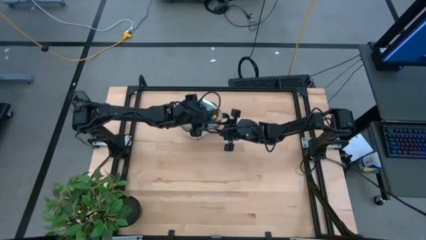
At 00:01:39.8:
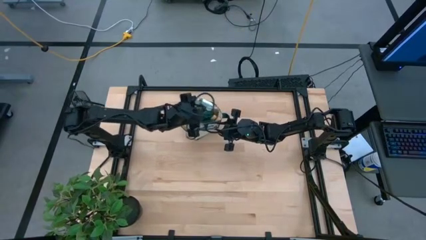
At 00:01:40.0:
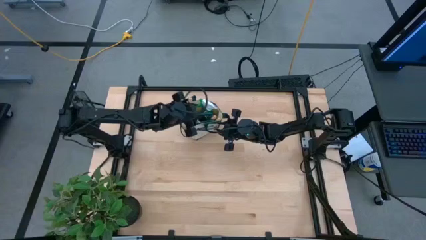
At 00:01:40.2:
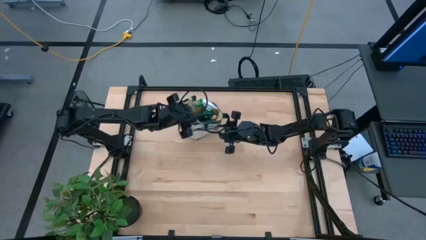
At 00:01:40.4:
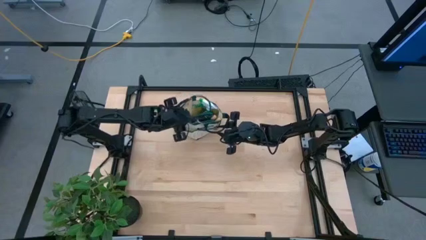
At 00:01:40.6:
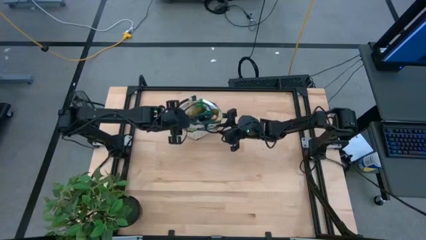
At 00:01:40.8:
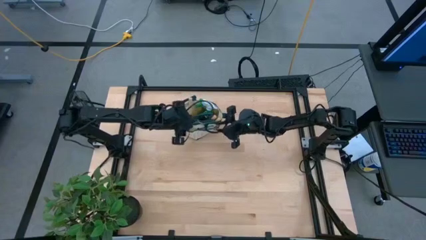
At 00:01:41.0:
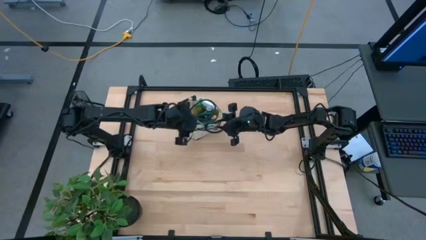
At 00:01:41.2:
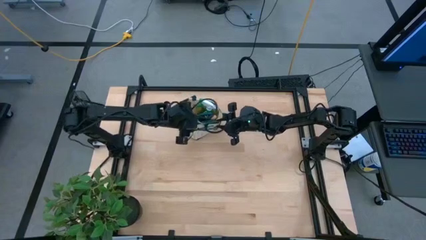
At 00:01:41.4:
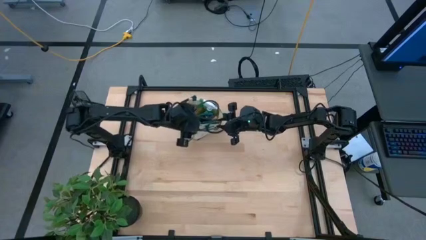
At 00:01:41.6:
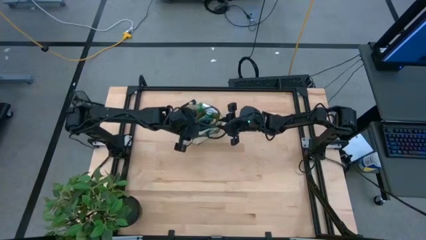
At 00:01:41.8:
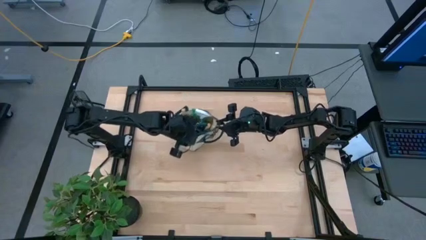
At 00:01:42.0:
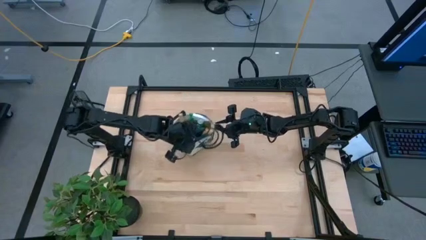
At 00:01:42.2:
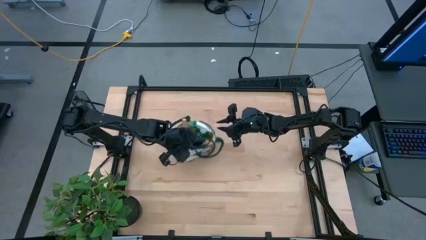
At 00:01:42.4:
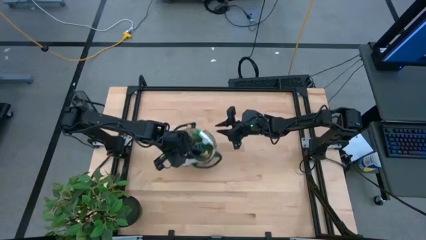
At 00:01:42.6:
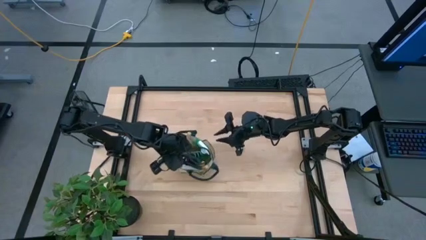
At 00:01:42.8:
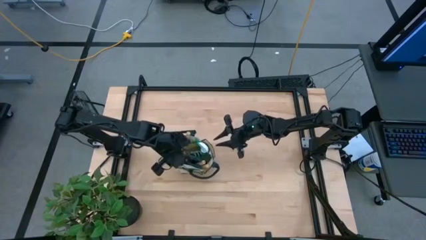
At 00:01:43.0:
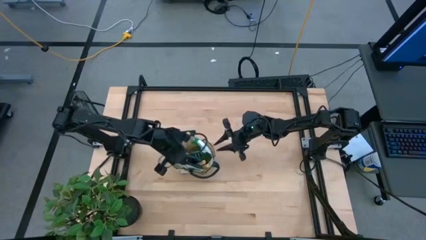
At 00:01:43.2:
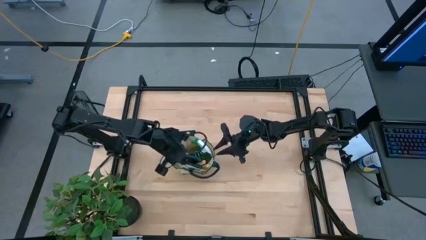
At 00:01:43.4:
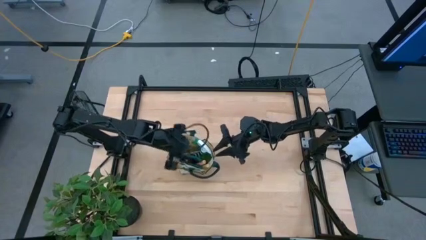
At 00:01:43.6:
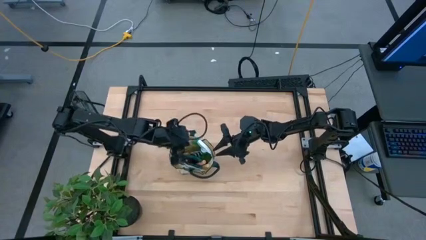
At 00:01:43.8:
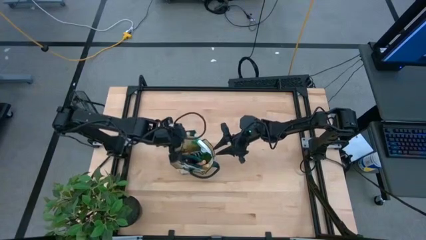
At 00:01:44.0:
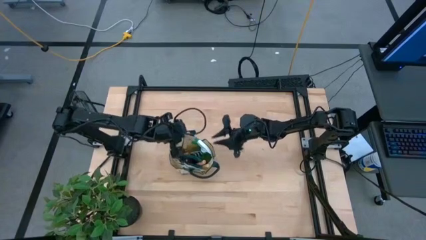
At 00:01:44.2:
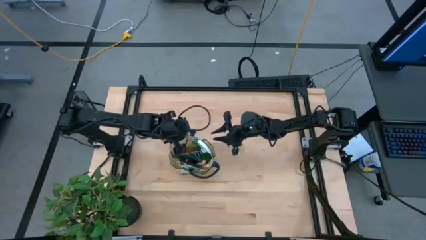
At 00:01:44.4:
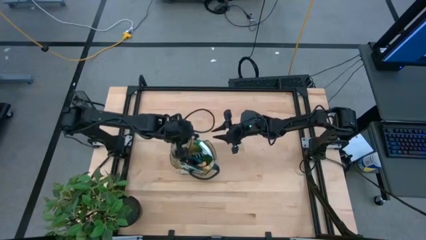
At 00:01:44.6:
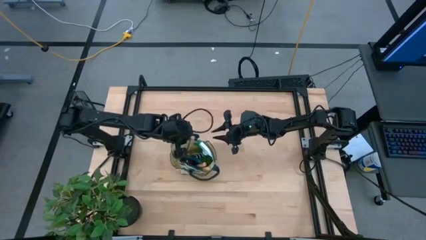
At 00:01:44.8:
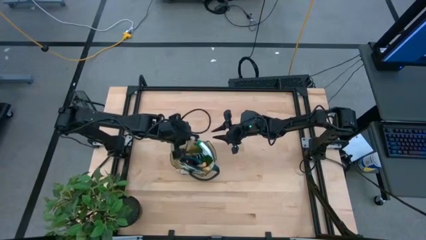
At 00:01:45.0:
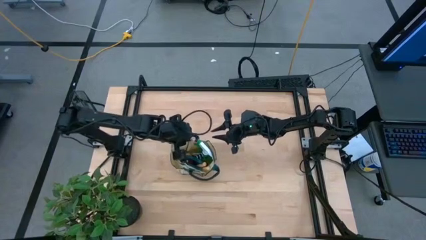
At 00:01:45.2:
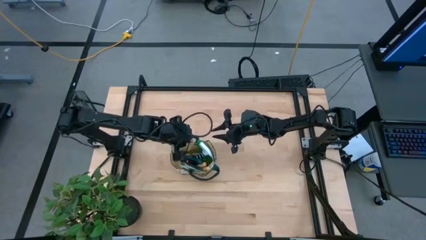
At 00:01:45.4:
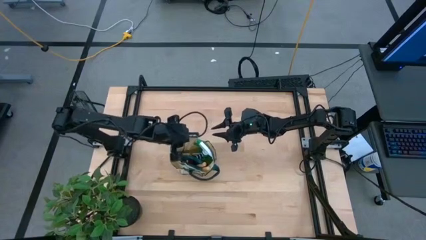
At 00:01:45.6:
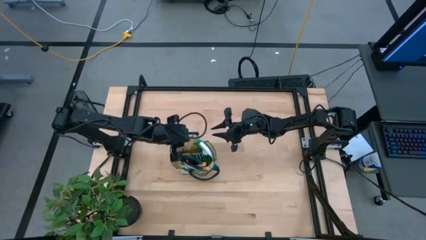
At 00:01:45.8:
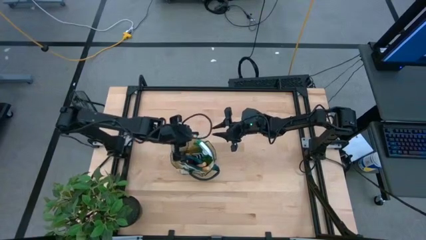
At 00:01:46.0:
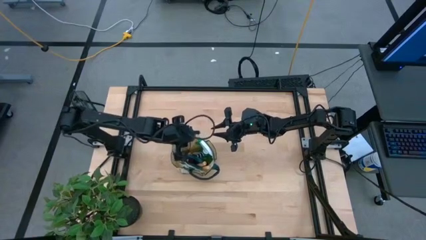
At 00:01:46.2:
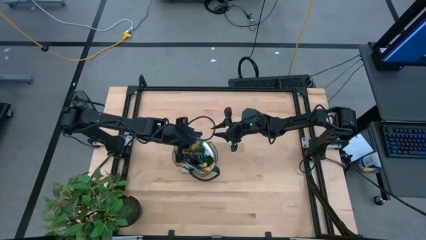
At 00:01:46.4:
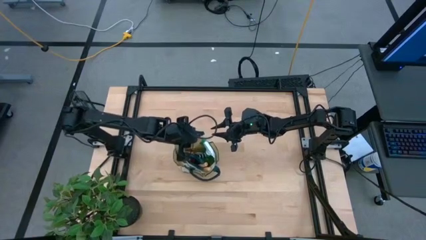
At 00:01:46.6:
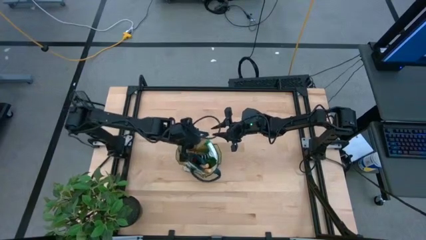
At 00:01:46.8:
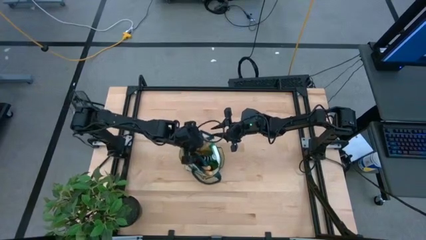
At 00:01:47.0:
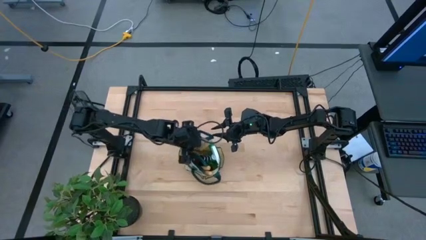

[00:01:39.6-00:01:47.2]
Task: Pick & Place Garden tools in Gardening bag
Adjust the gardening bag

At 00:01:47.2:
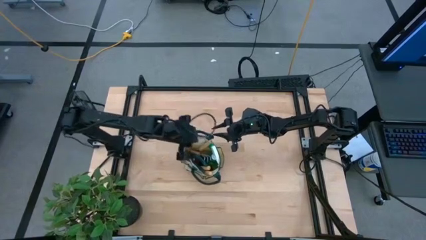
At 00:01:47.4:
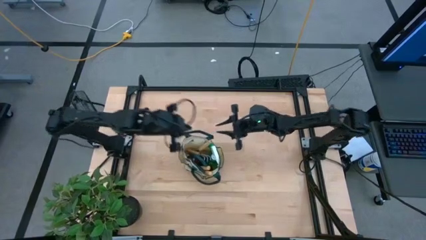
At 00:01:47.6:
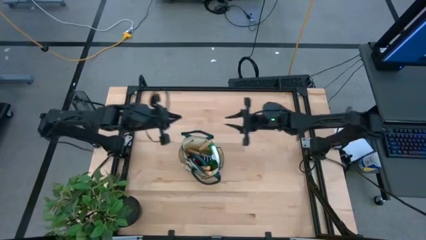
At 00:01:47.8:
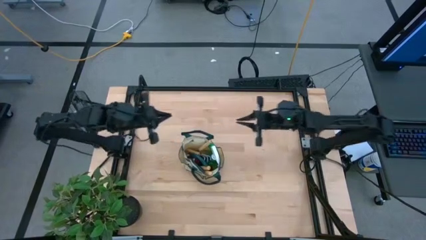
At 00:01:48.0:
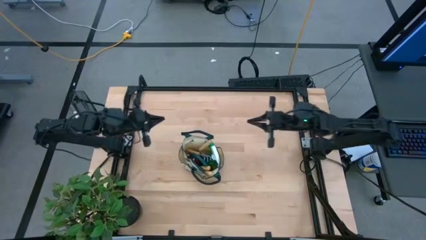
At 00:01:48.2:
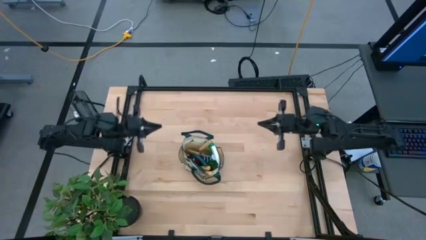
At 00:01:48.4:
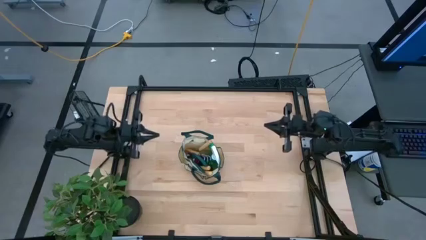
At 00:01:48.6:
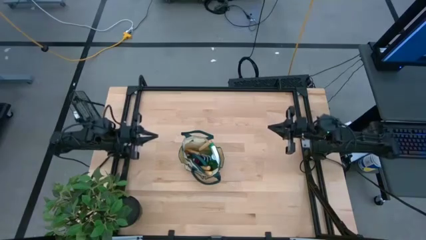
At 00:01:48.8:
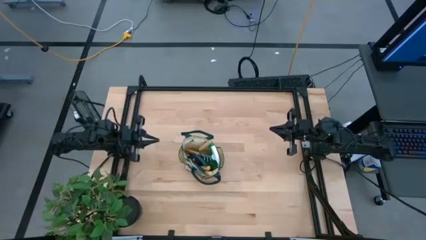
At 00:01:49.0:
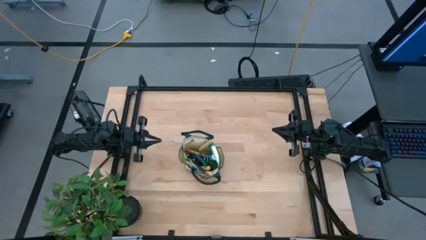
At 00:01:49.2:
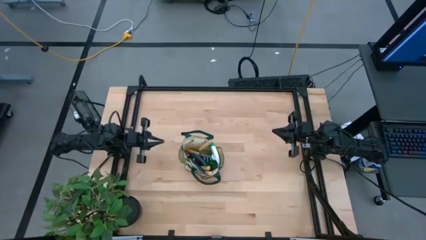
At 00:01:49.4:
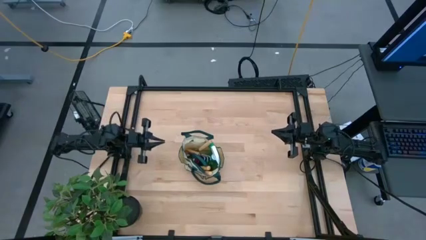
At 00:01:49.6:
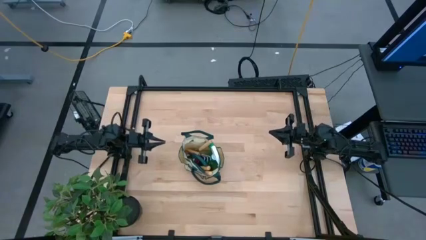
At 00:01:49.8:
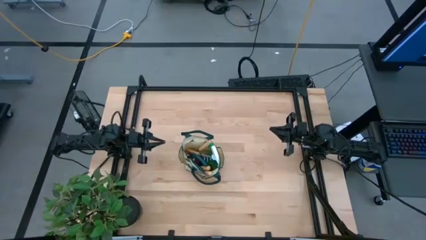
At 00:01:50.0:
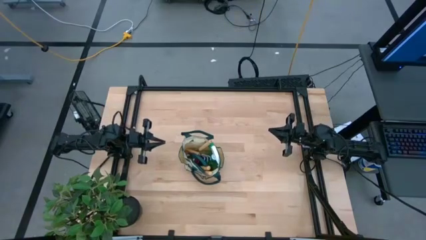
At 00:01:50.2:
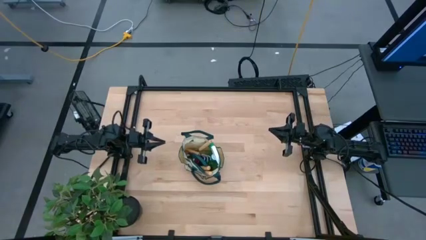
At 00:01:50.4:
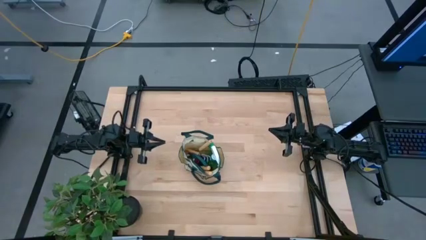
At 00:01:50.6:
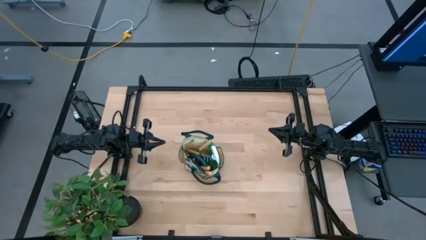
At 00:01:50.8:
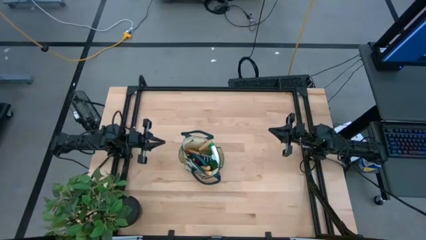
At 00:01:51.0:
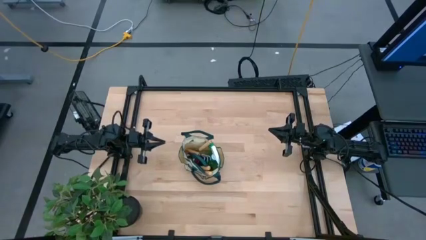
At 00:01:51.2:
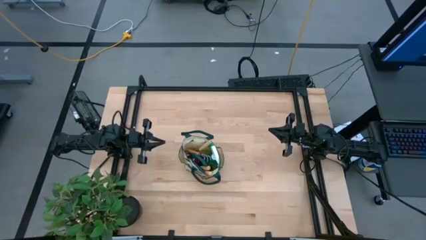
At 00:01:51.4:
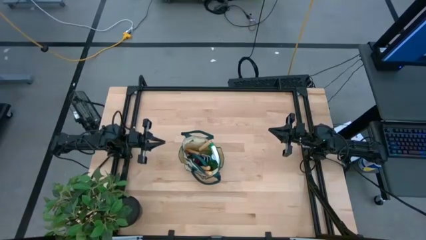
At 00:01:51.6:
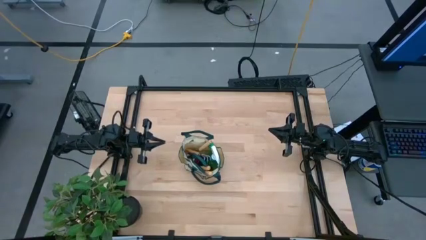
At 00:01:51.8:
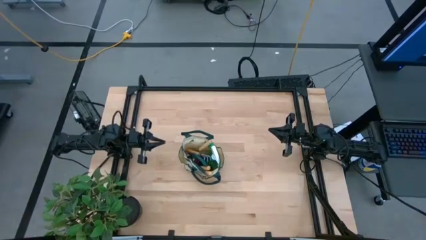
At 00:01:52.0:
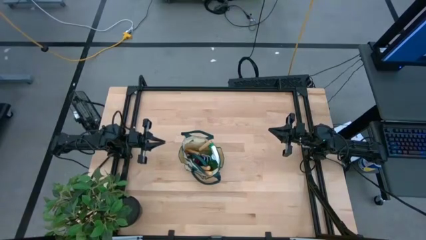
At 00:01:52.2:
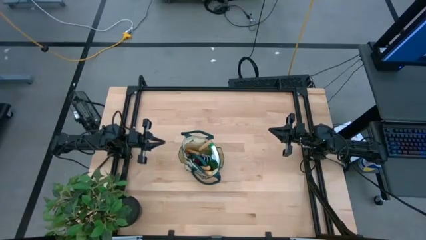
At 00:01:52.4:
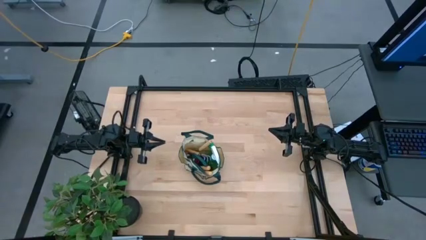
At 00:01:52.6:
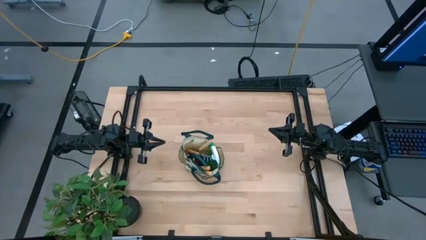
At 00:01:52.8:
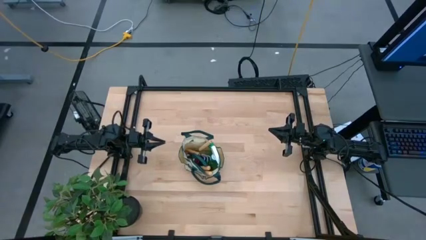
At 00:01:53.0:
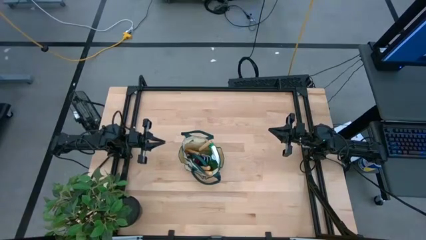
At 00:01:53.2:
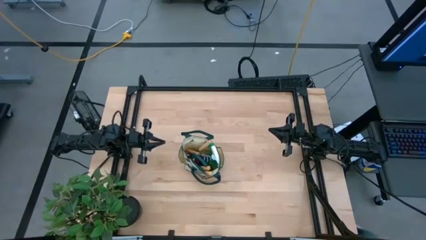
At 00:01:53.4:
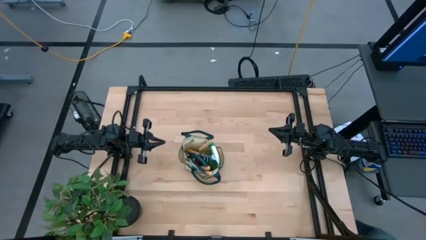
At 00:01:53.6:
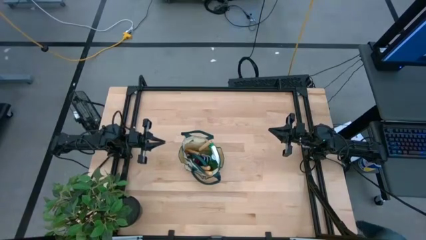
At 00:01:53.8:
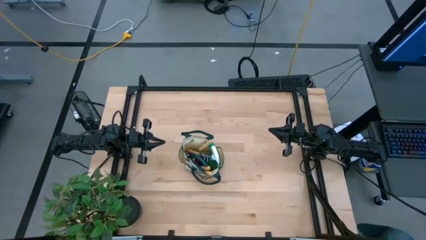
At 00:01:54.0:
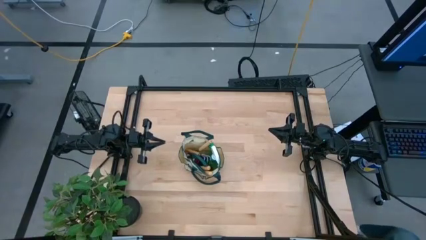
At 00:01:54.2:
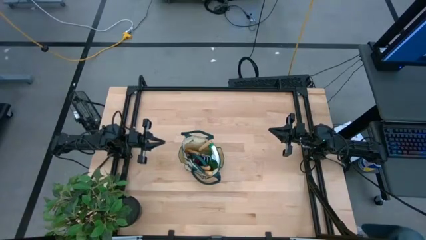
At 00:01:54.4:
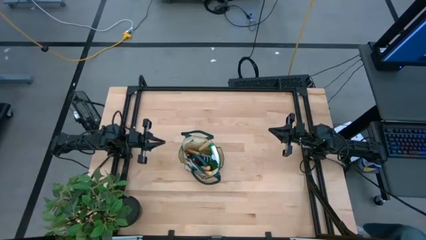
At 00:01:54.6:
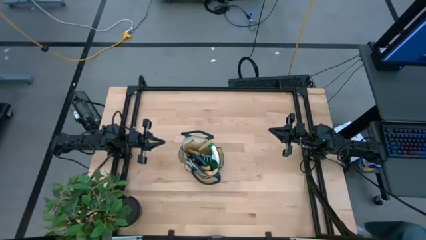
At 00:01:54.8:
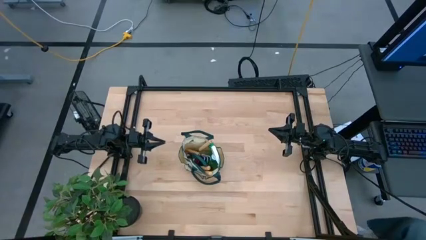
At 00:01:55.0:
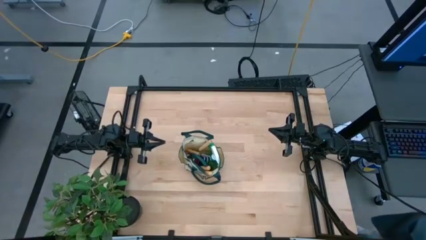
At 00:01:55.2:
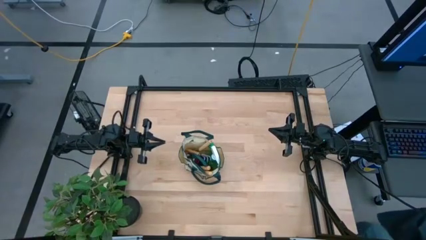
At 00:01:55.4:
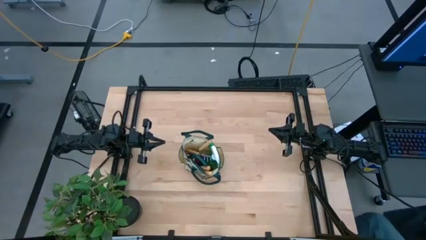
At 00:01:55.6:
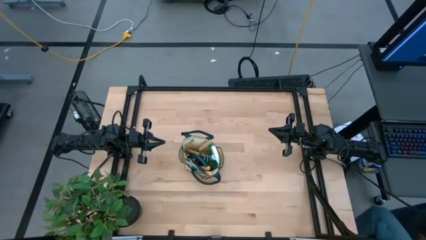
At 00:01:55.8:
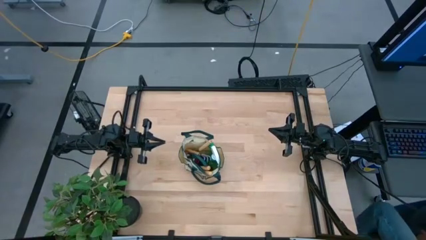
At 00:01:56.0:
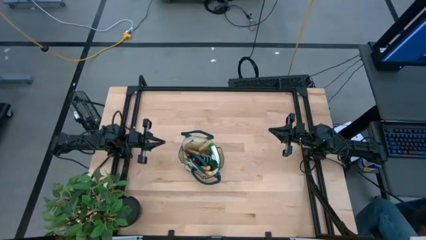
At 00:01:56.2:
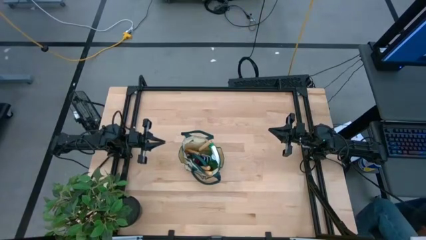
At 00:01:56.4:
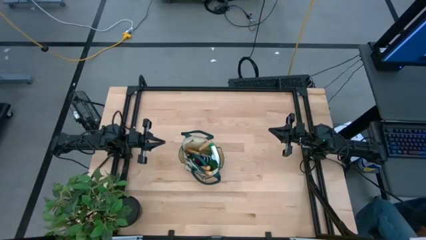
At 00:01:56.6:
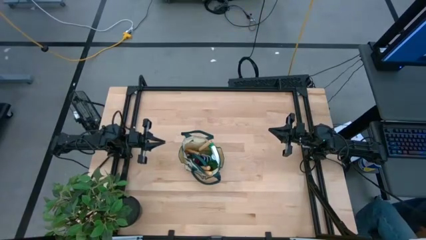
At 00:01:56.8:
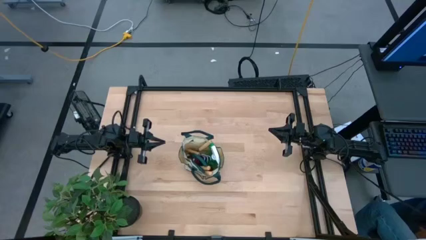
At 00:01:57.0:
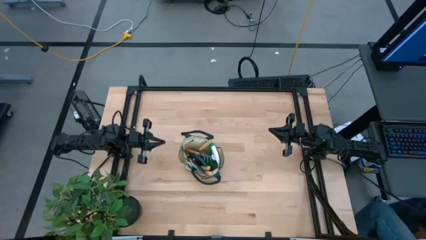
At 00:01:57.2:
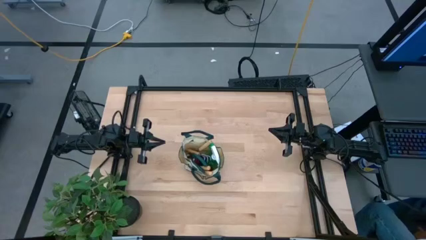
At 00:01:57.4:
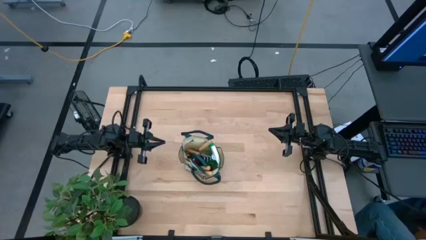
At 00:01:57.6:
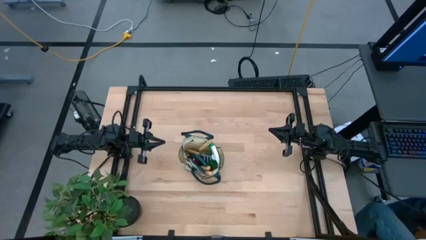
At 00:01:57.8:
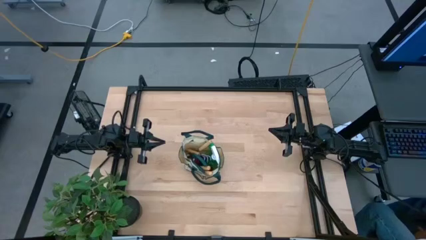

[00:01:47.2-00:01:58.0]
Return to Home Position
